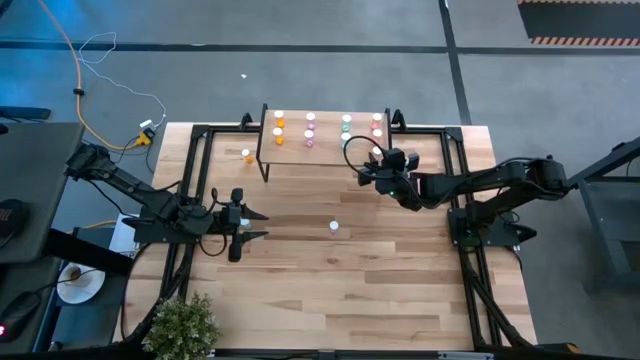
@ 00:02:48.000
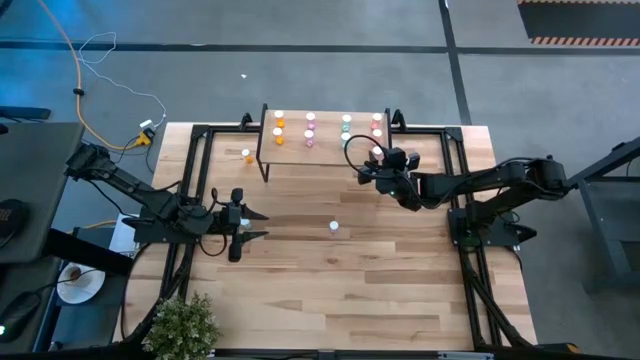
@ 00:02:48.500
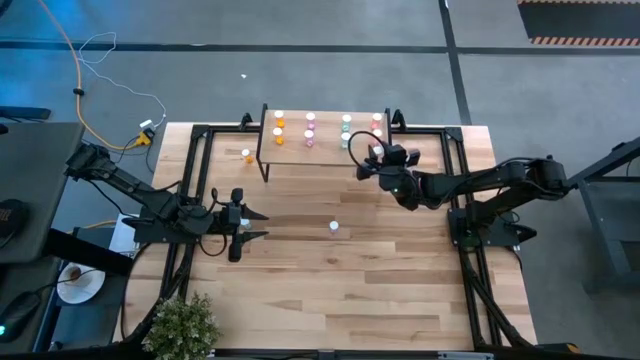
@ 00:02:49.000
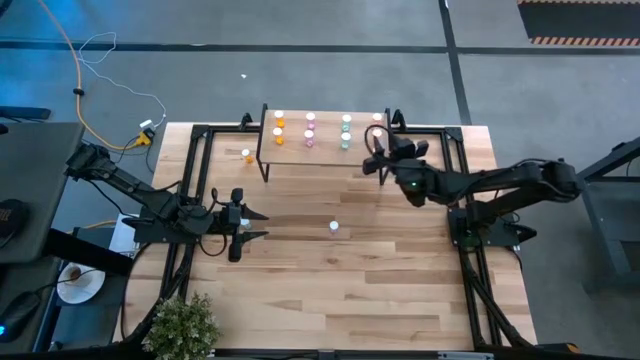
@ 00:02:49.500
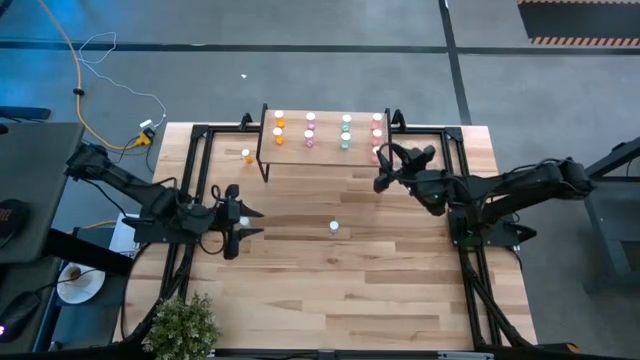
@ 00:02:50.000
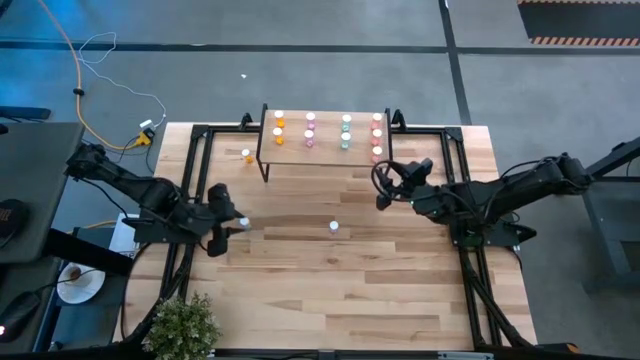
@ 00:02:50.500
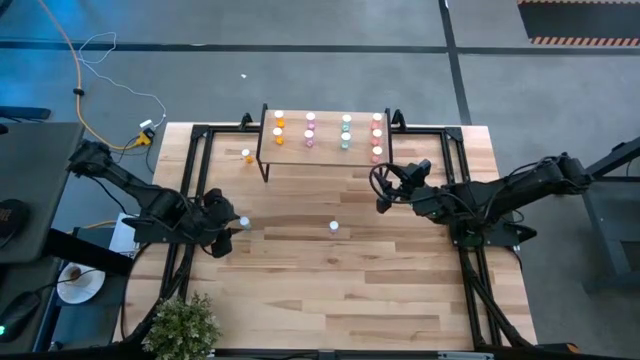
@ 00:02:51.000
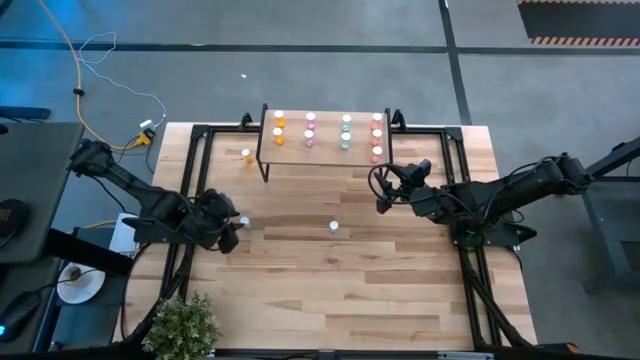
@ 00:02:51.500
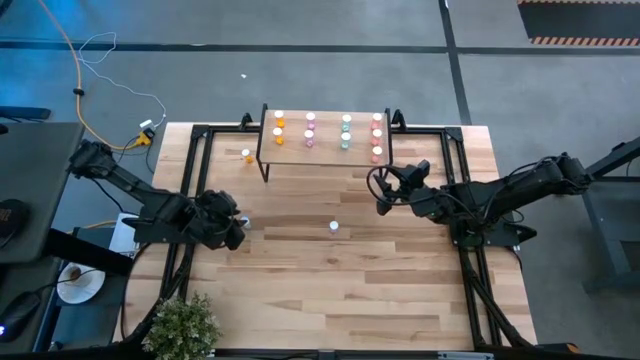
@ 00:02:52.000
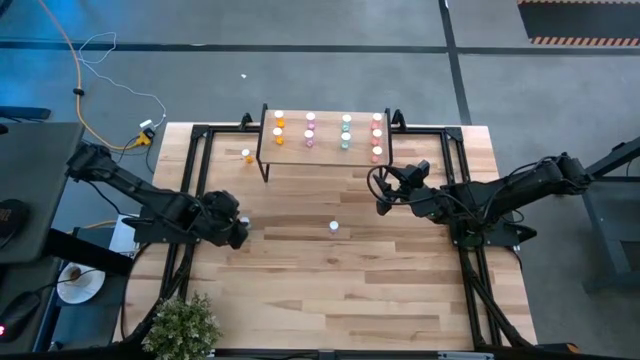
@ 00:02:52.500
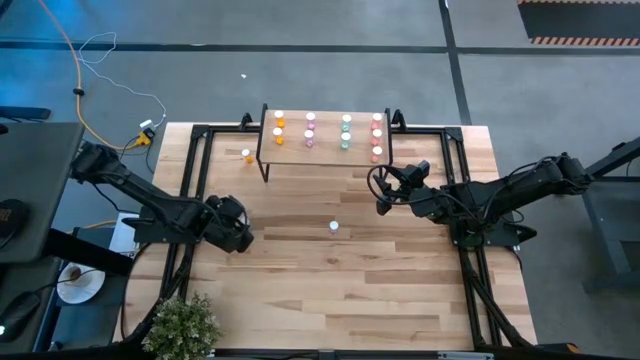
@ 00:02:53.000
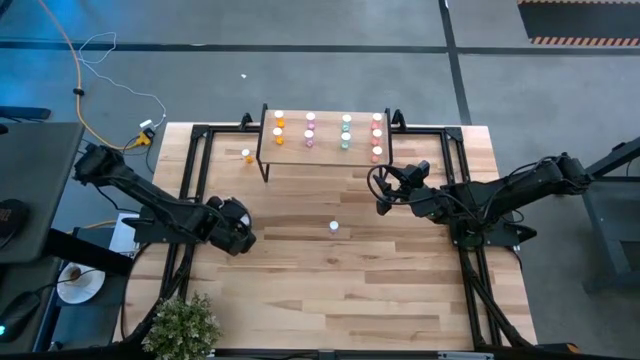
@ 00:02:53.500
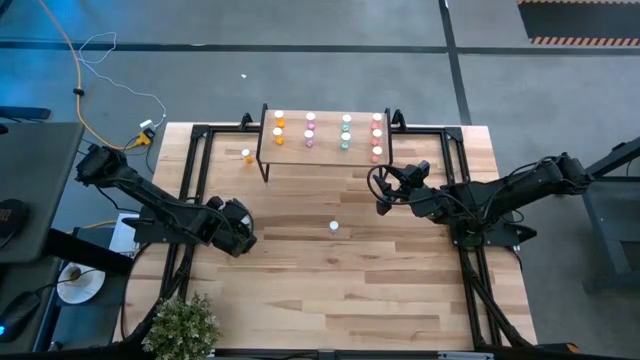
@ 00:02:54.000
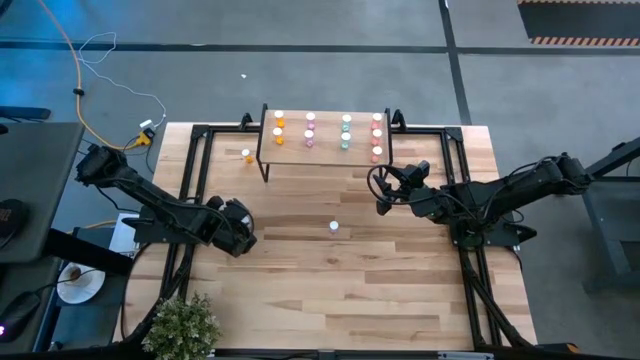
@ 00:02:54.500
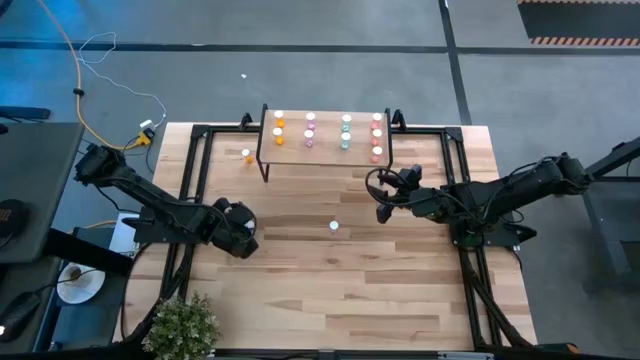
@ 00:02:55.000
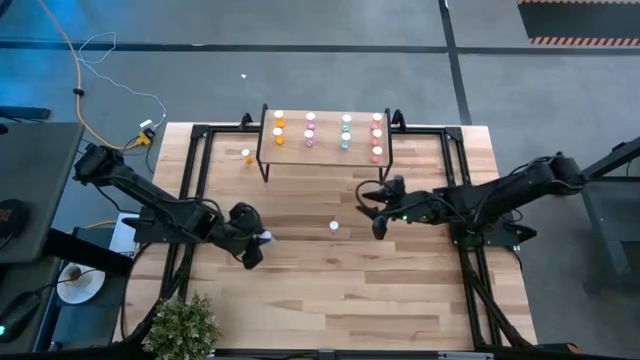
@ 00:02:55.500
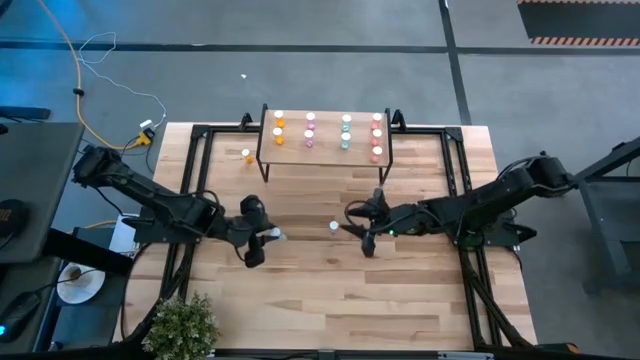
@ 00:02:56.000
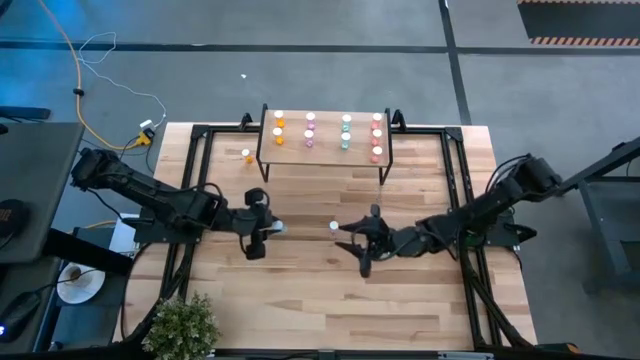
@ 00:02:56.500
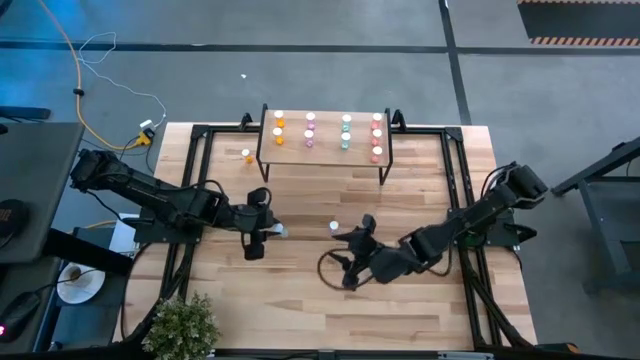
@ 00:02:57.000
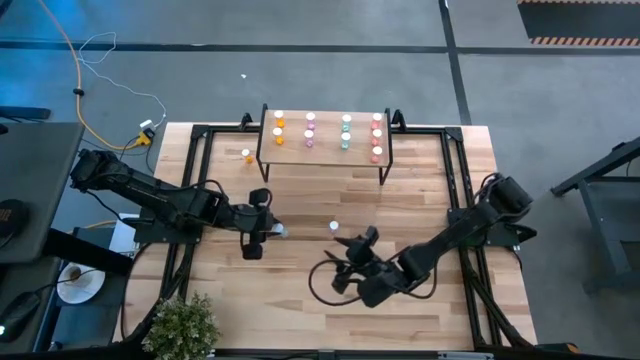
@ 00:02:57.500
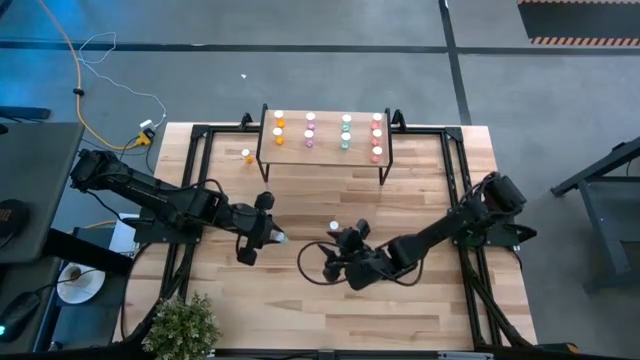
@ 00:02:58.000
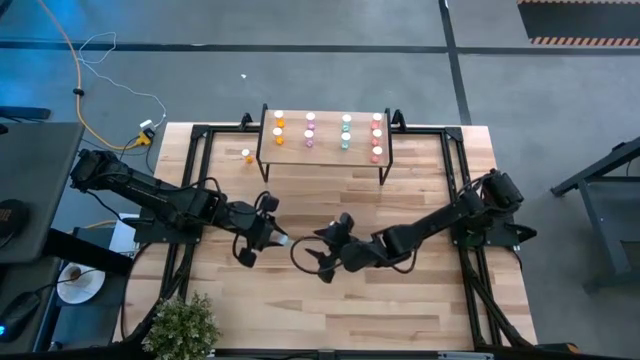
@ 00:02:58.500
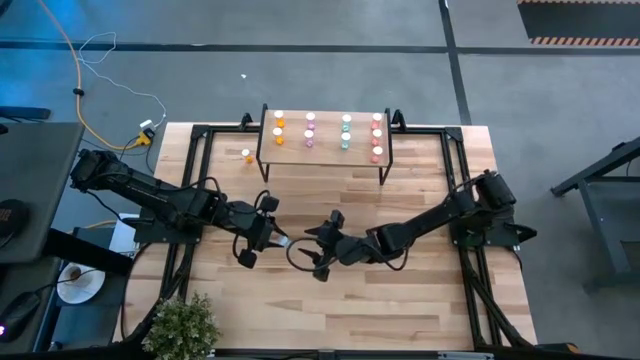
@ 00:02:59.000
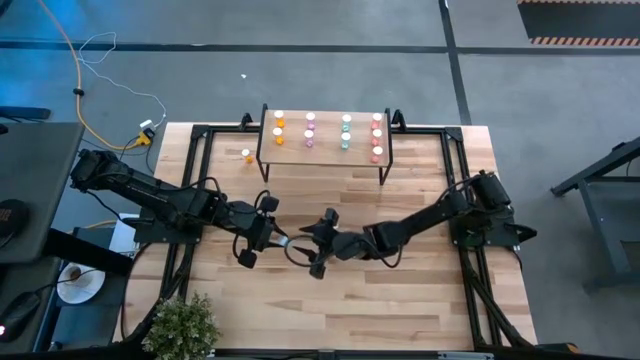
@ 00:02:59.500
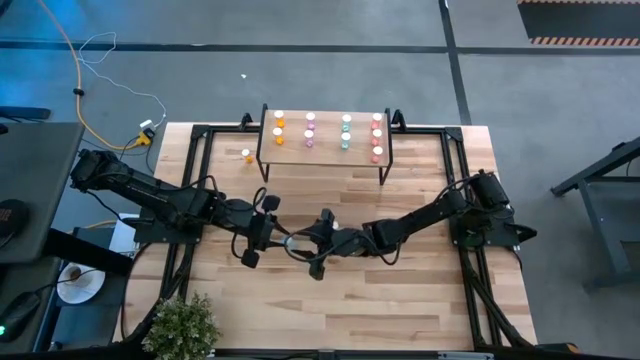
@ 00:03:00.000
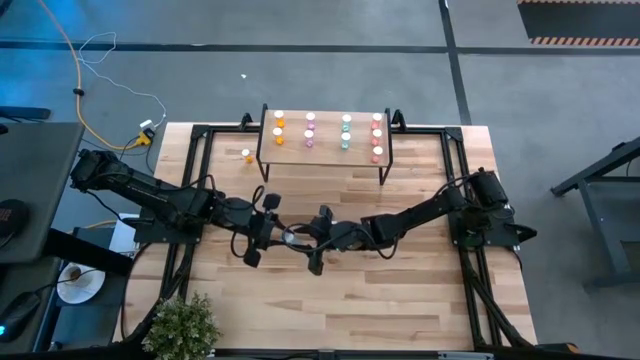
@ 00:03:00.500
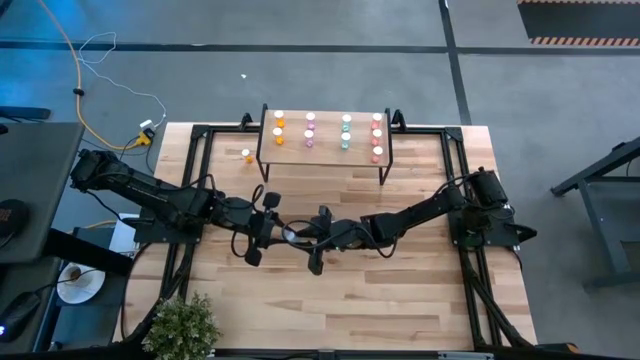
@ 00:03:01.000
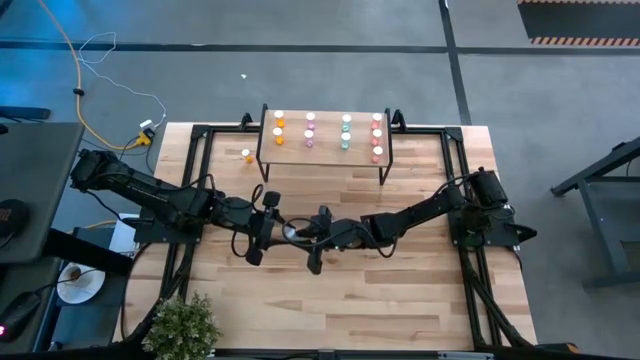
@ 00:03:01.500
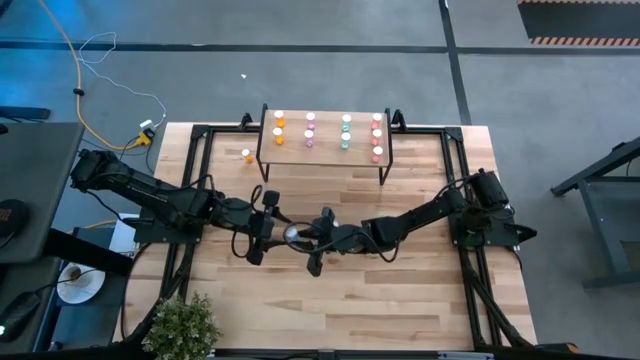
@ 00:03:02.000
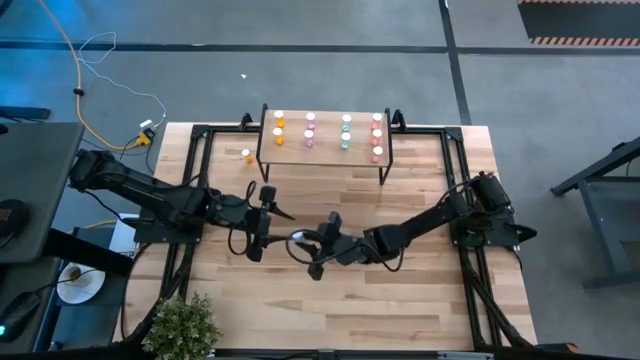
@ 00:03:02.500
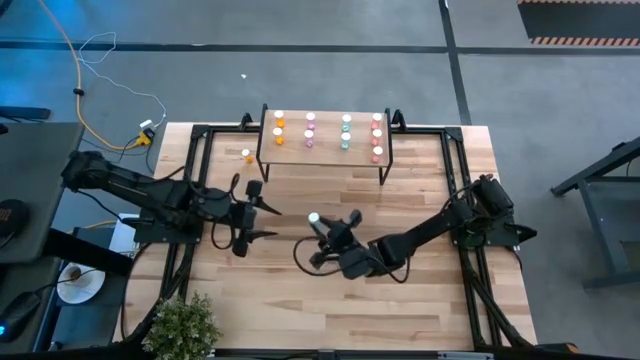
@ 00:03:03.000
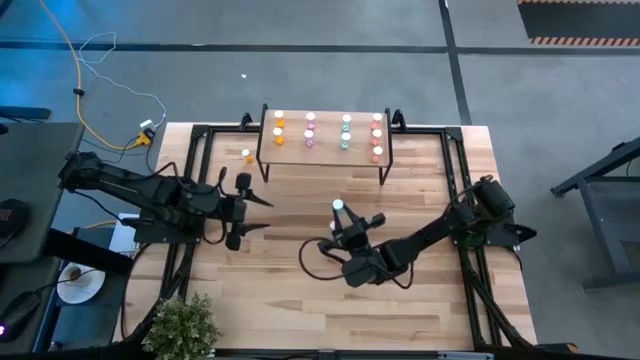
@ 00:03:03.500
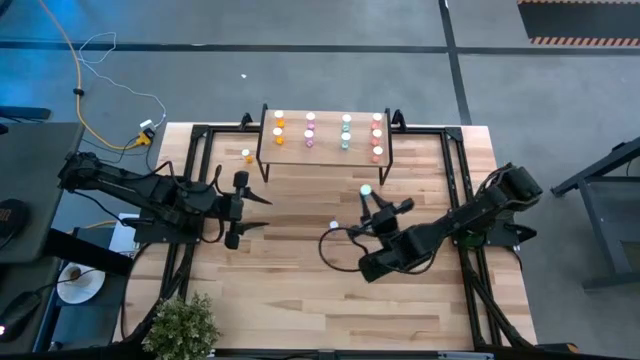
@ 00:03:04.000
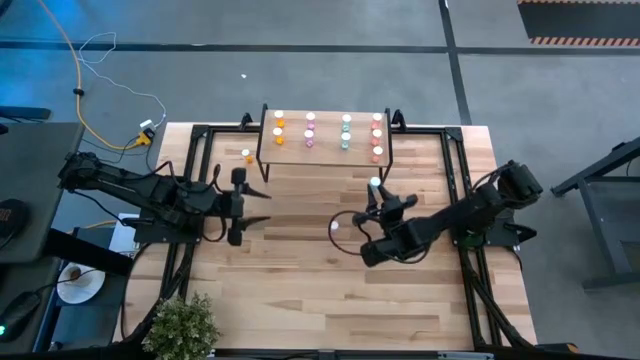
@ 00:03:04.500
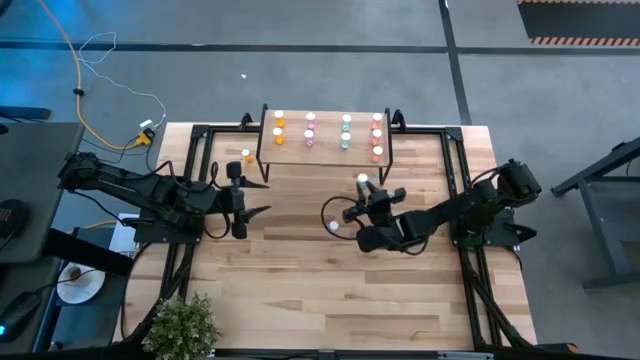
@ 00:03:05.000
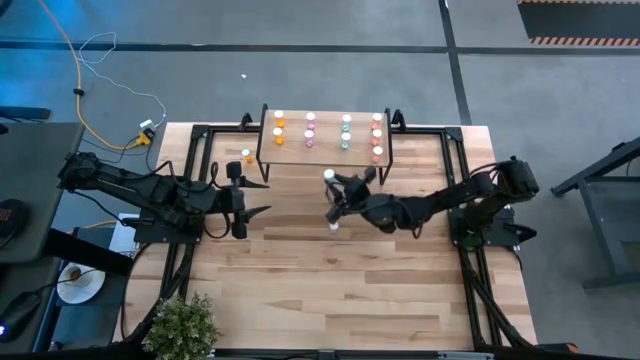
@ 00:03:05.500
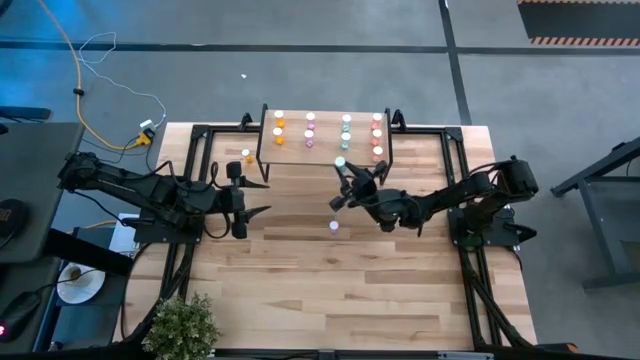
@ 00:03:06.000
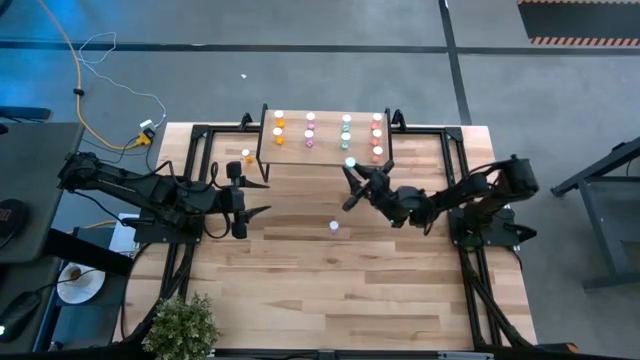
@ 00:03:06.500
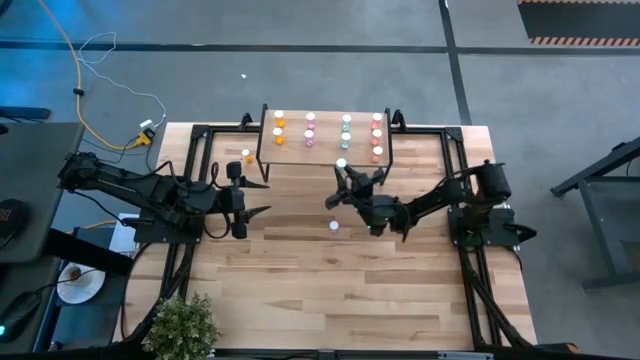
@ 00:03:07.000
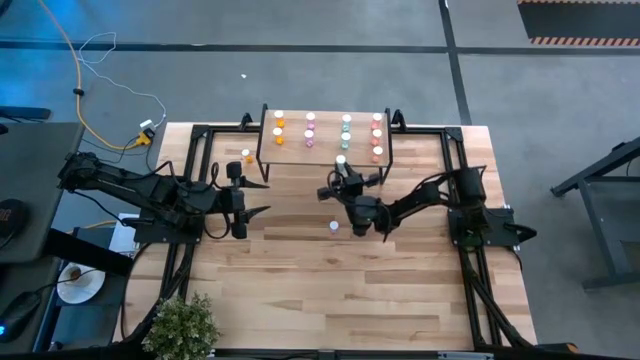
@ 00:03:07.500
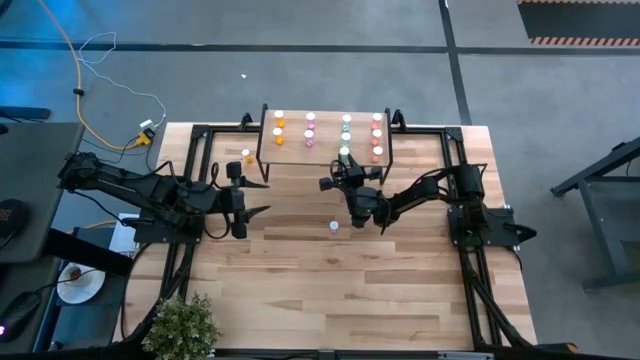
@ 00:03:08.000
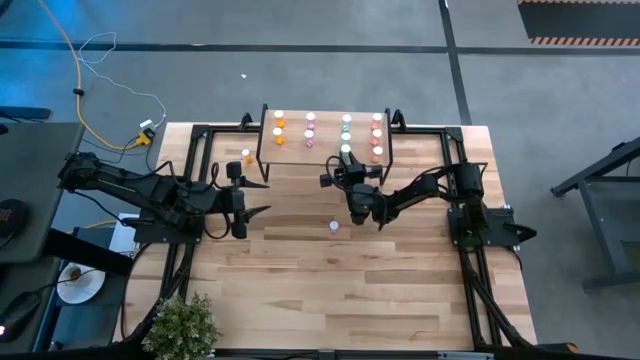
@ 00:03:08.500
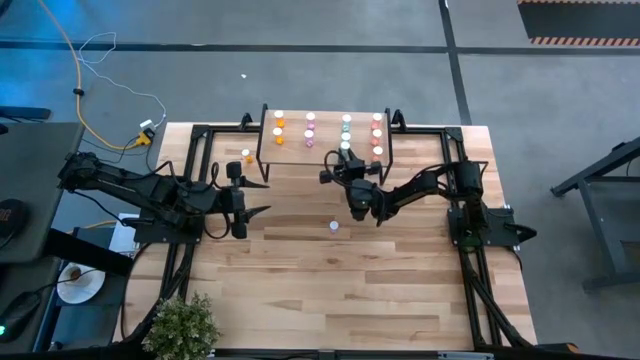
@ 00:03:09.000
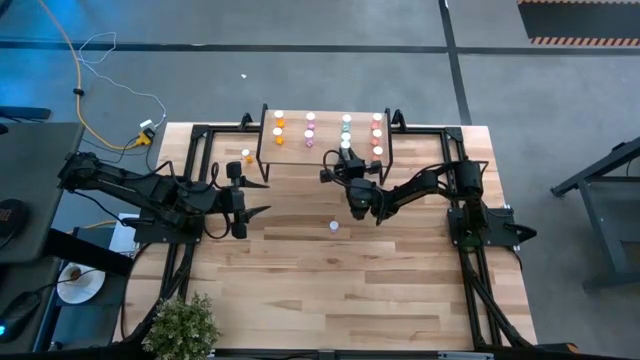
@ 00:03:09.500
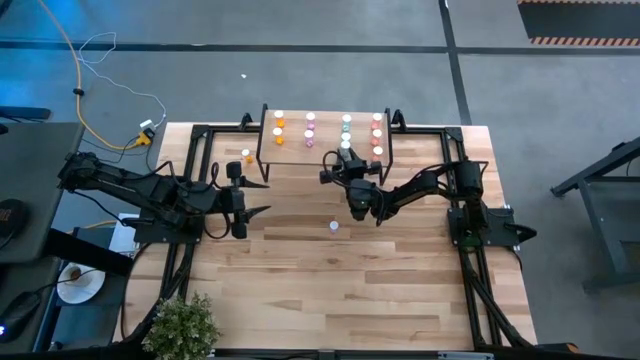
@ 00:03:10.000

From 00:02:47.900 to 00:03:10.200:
Task: Pick and place medicine bottles onto shelf by color
Put the green pill bottle on the shelf aligned with the other green pill bottles
